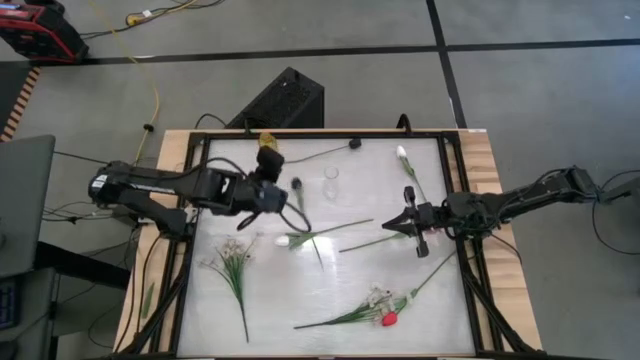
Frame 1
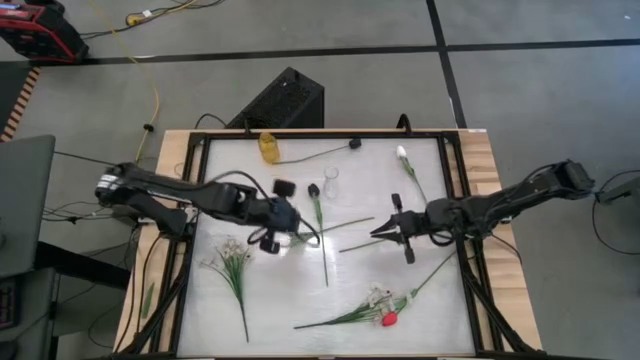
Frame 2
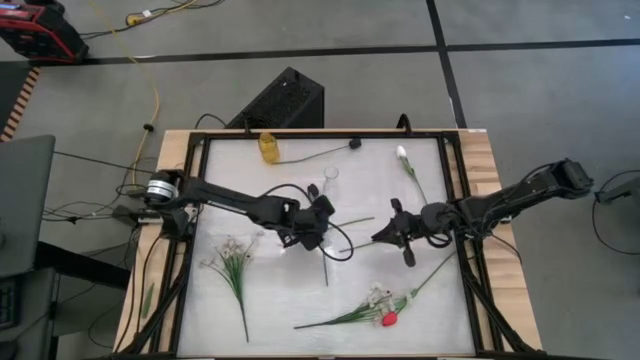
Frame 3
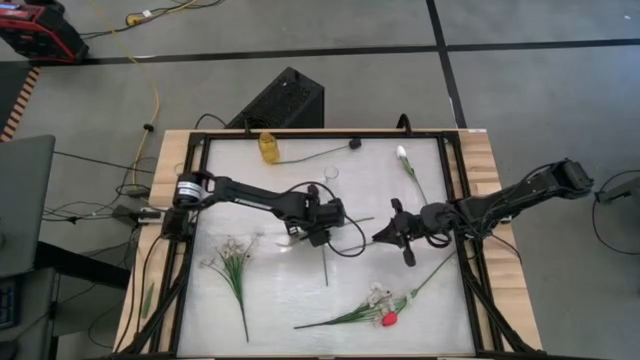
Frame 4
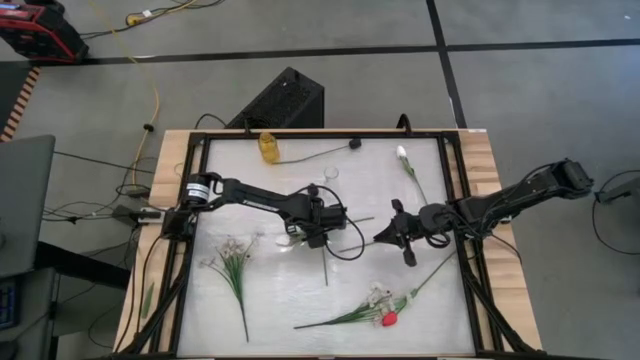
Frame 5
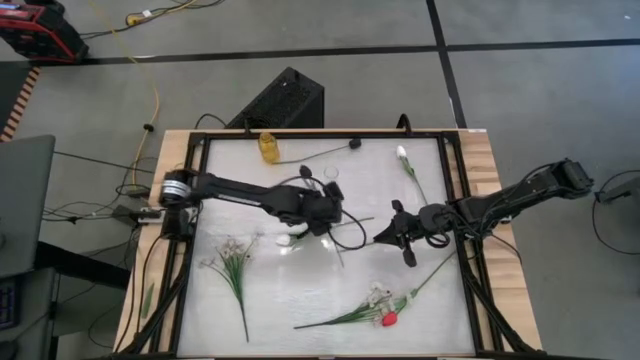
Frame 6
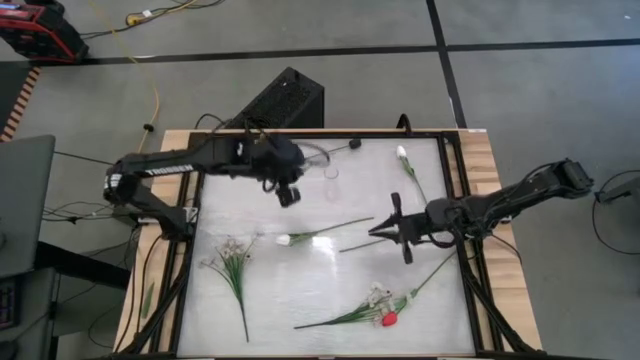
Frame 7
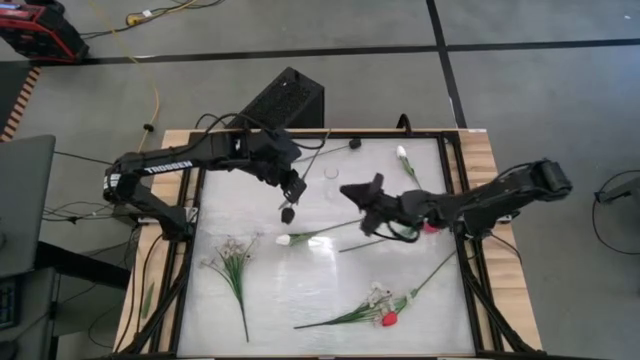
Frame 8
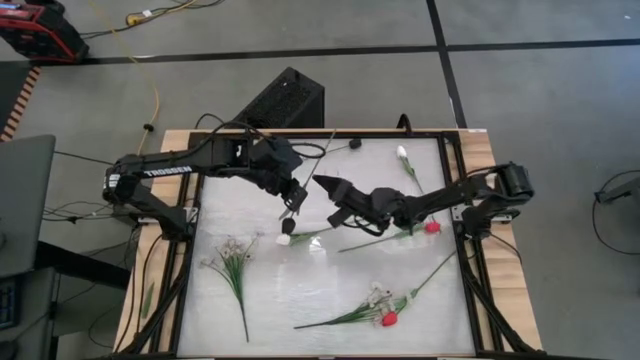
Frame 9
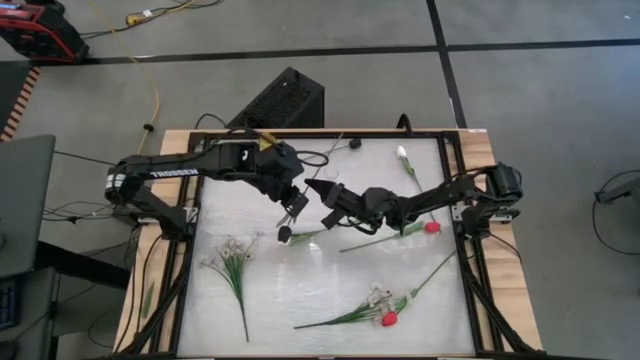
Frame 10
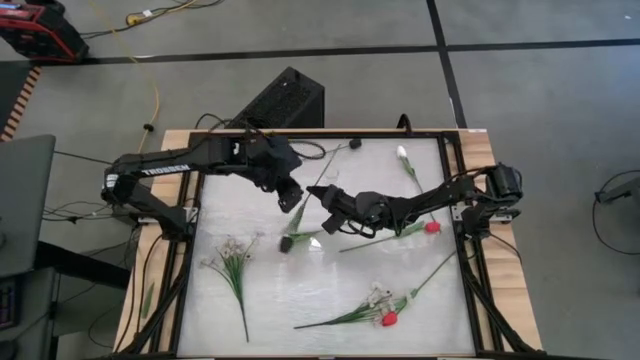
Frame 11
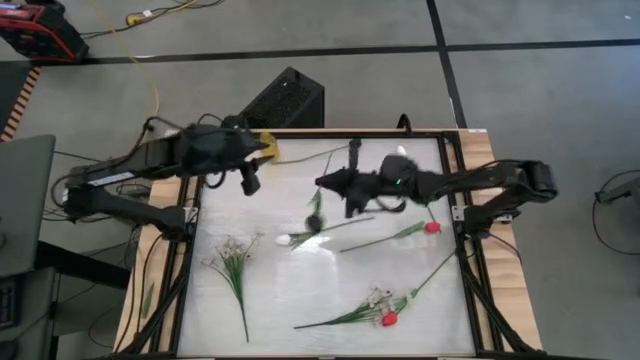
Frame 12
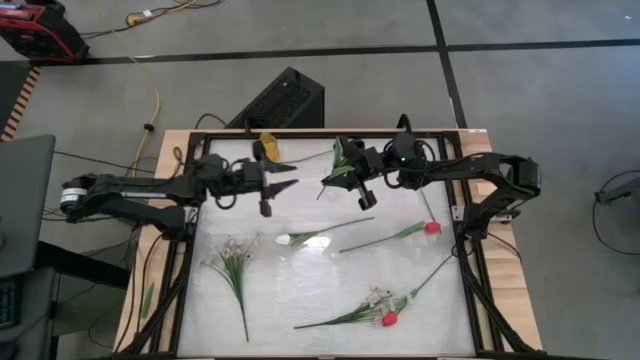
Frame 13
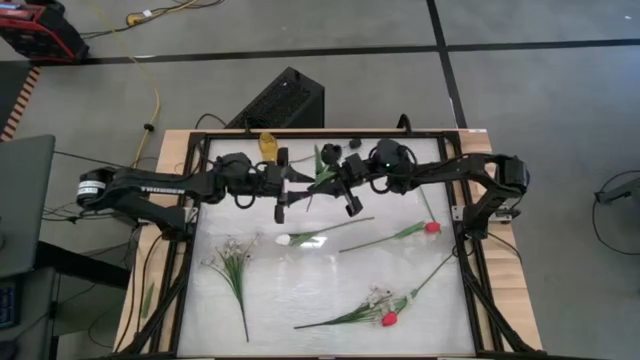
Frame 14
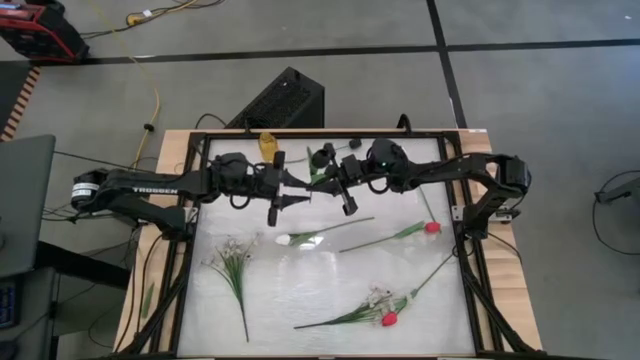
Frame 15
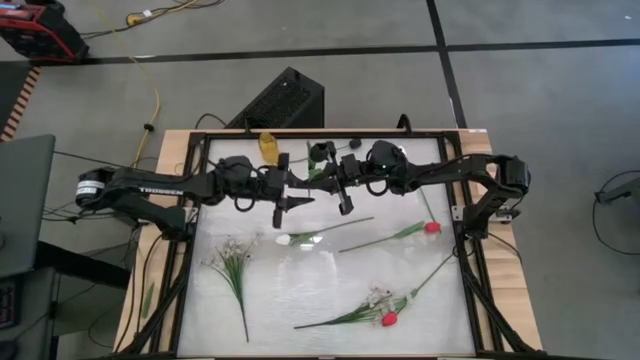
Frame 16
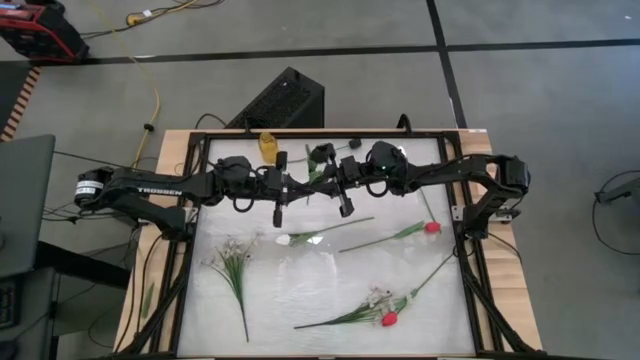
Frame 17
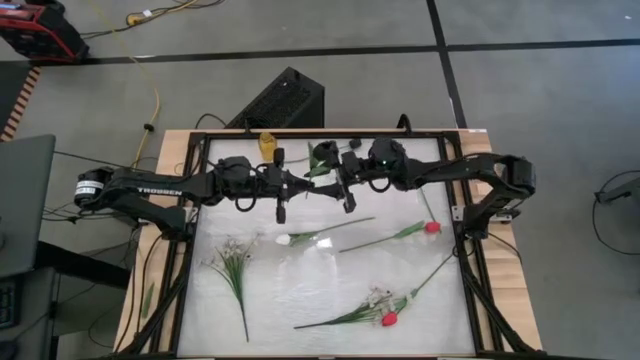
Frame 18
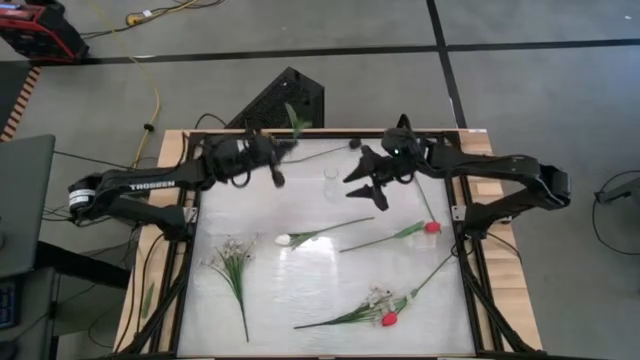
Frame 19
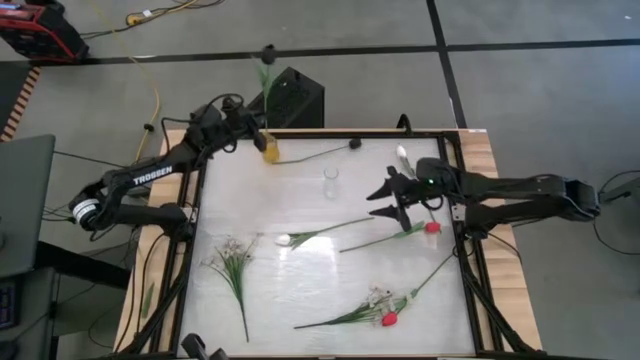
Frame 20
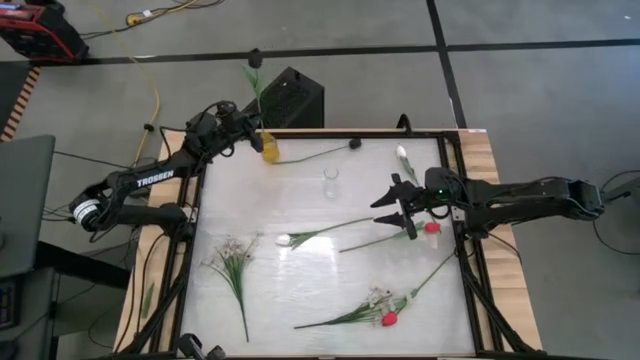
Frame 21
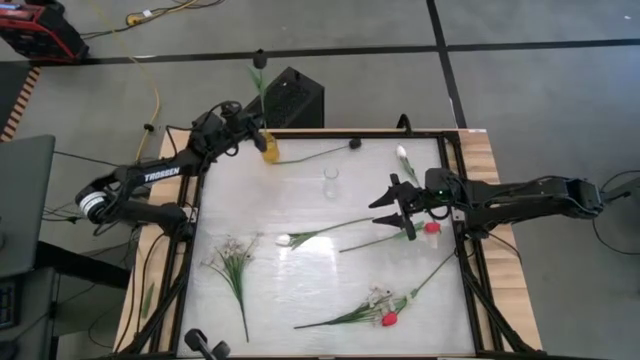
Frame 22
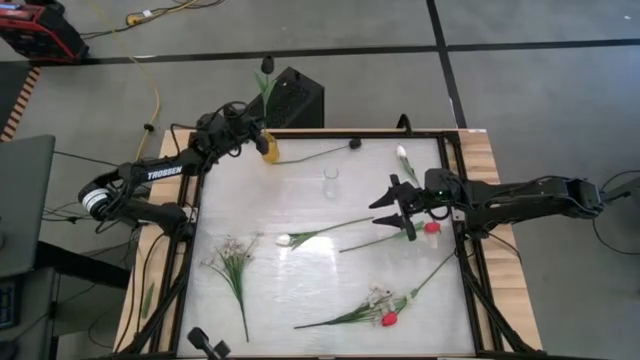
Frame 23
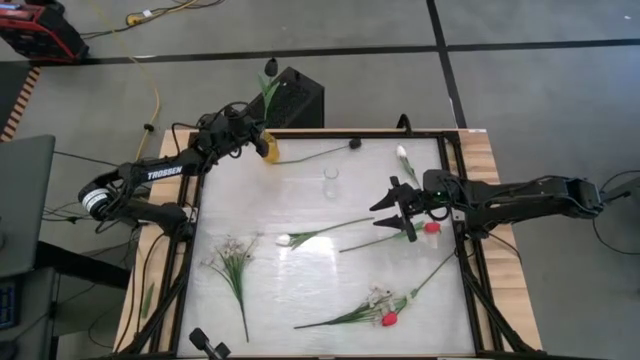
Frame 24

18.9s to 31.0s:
Task: Sort flowers into vase by color
Put the bottom black flower into the yellow flower vase

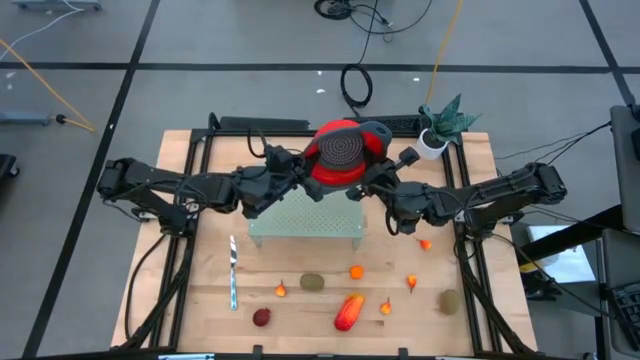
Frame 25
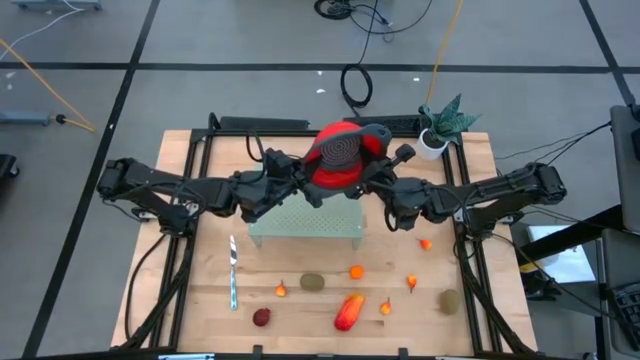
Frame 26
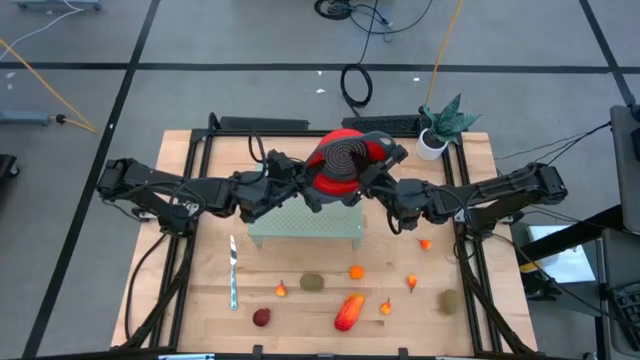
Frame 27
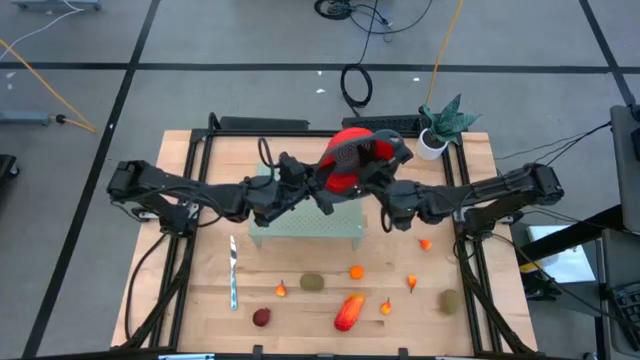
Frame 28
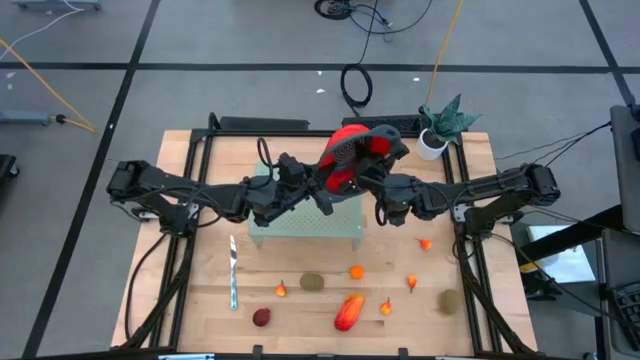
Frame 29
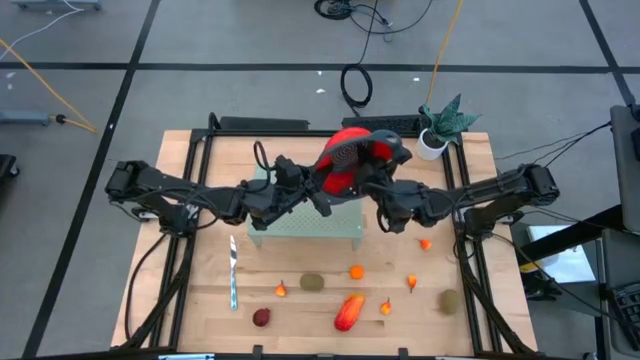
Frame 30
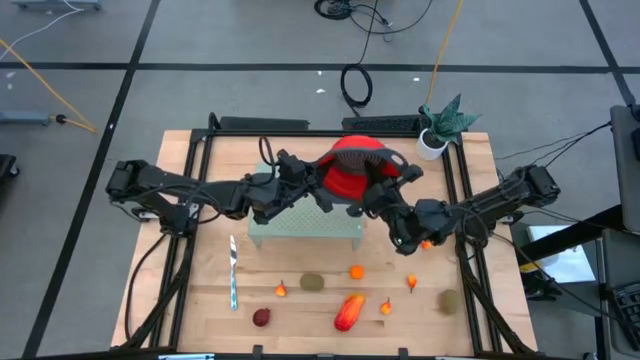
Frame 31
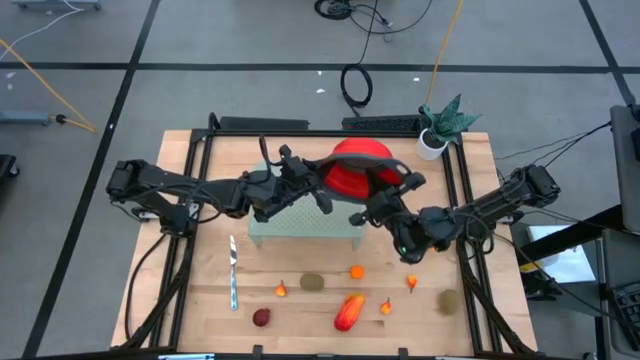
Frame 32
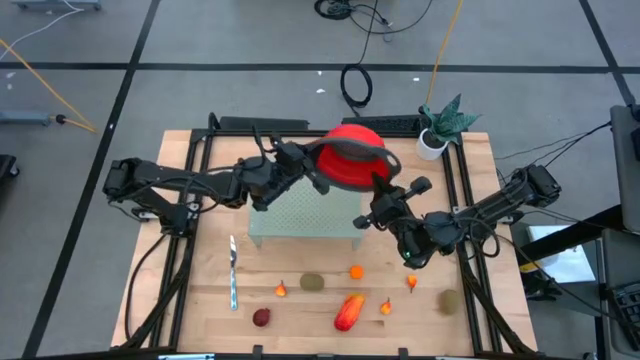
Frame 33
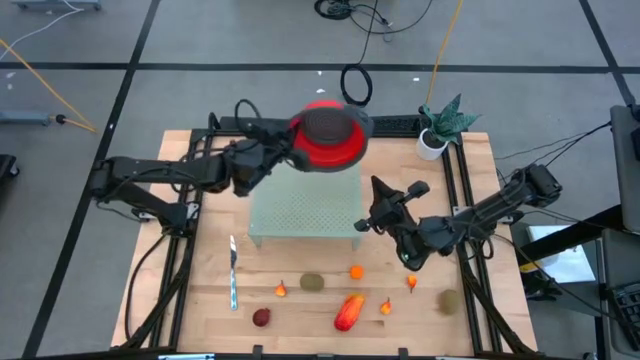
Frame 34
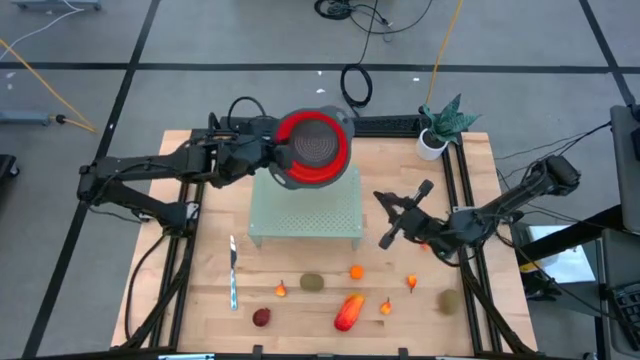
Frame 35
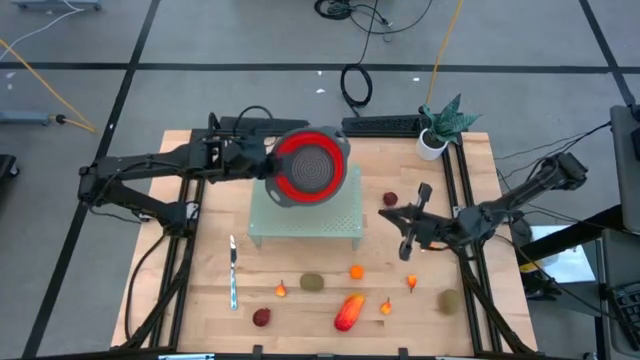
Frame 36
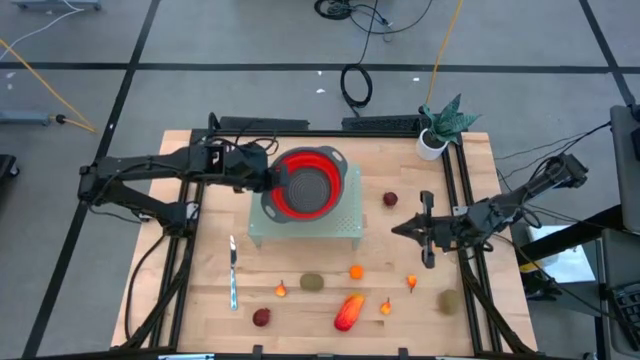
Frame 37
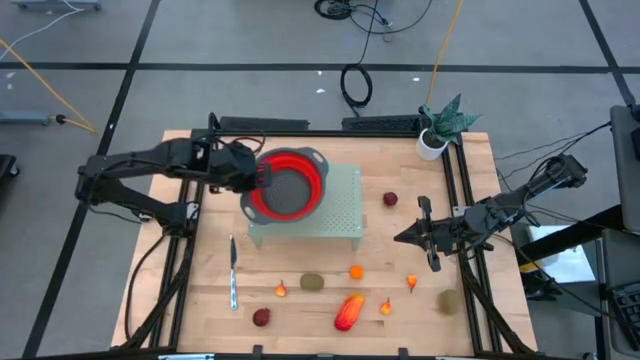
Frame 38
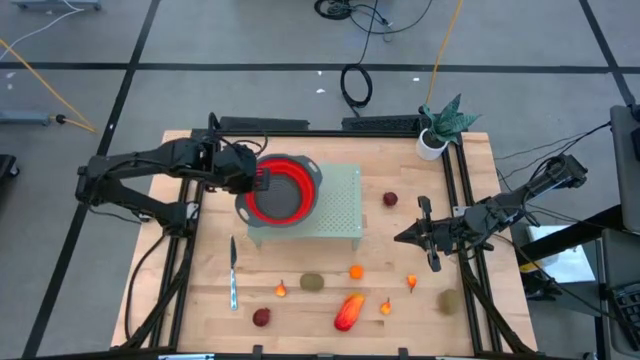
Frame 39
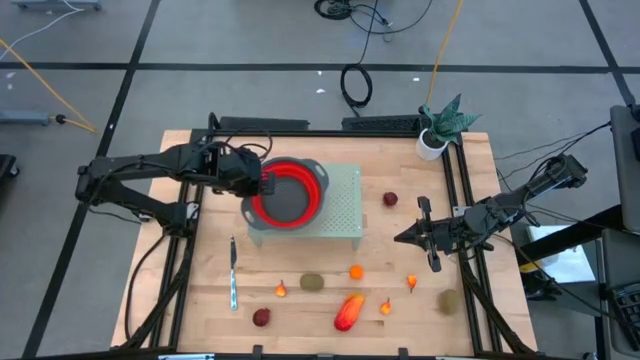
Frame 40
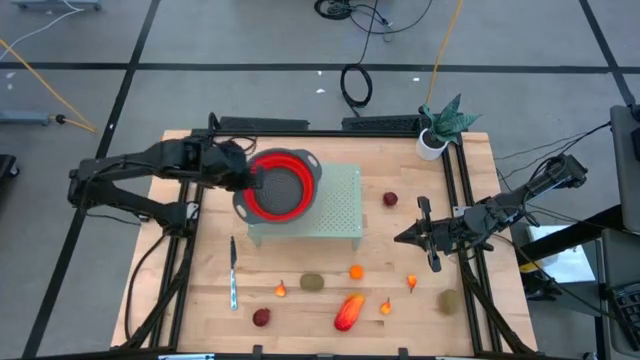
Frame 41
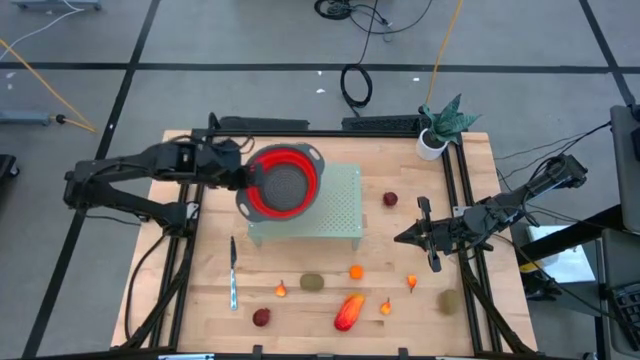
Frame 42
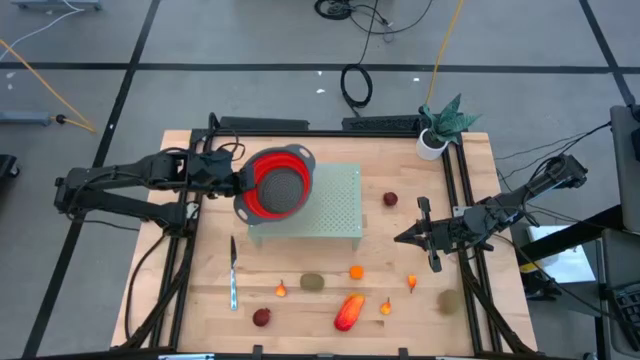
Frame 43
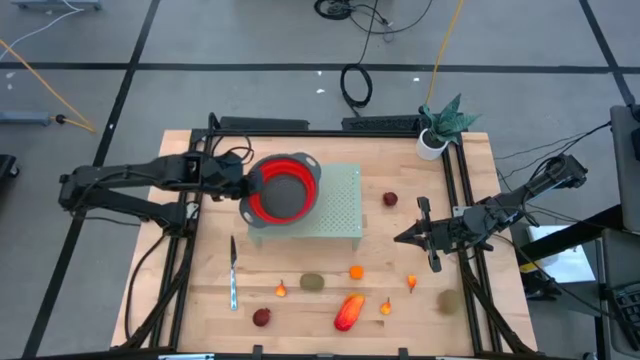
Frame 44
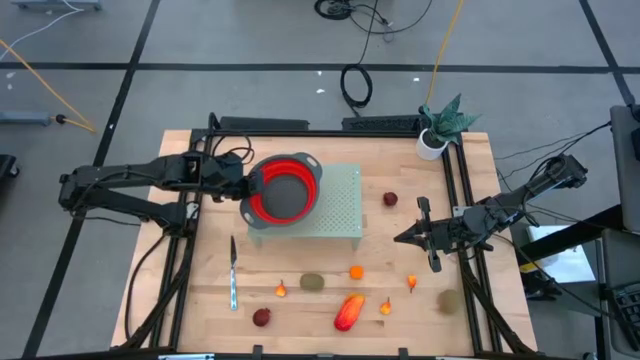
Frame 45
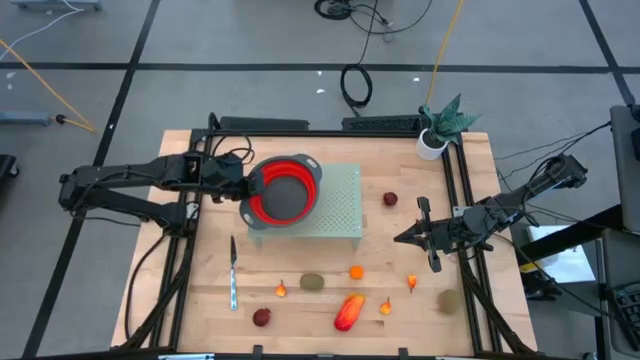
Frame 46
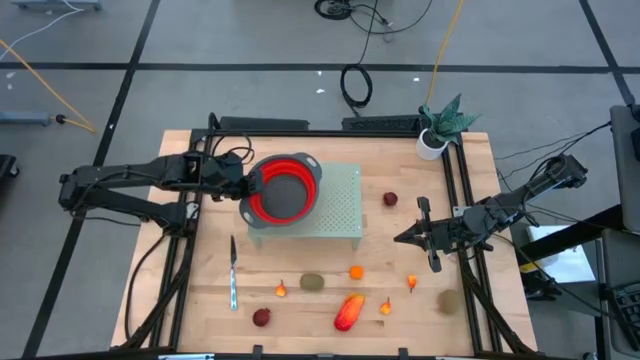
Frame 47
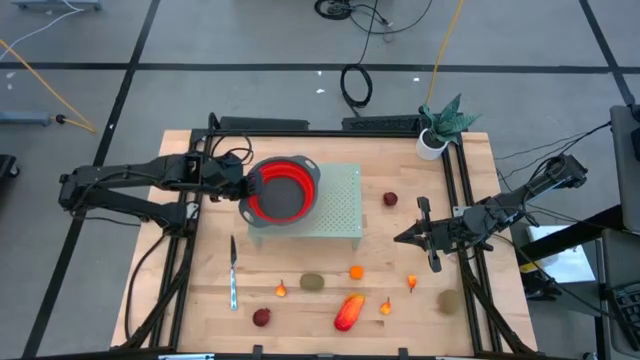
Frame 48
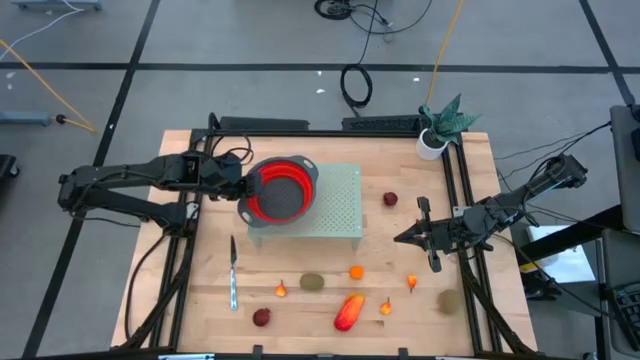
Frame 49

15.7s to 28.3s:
Task: Pick & Place Fruit
Put the strainer bowl on the shelf
